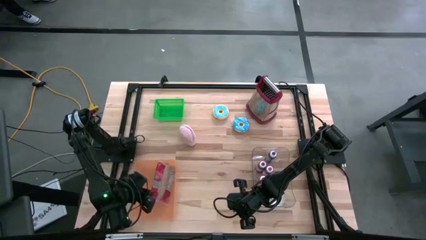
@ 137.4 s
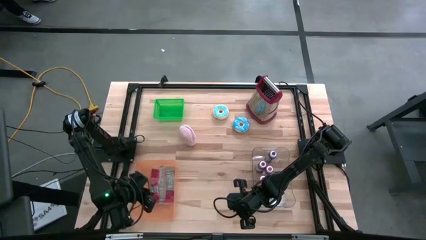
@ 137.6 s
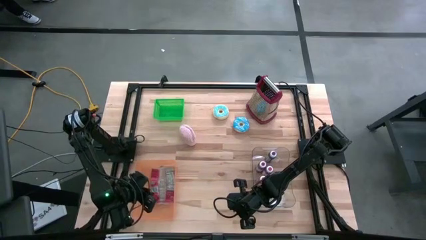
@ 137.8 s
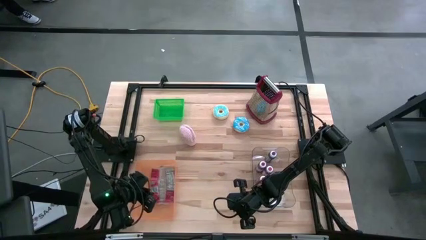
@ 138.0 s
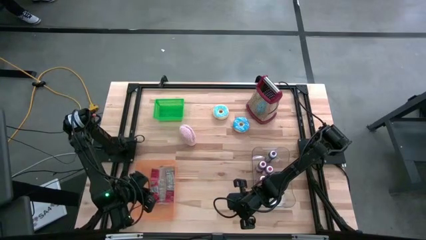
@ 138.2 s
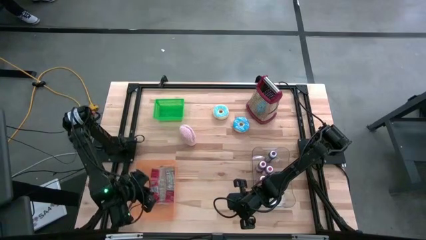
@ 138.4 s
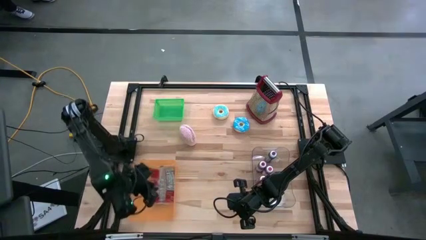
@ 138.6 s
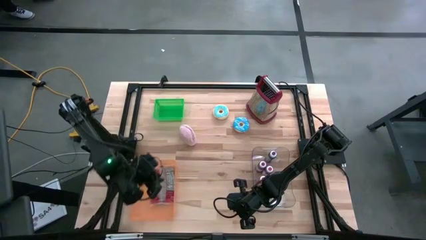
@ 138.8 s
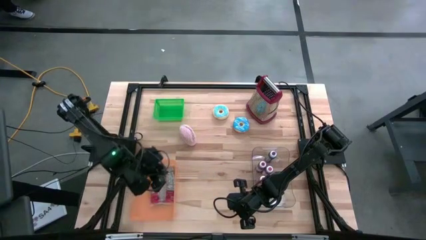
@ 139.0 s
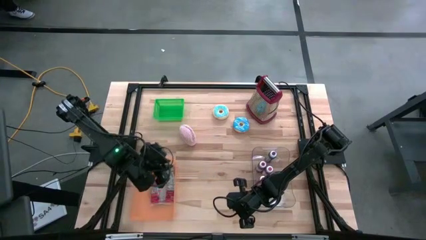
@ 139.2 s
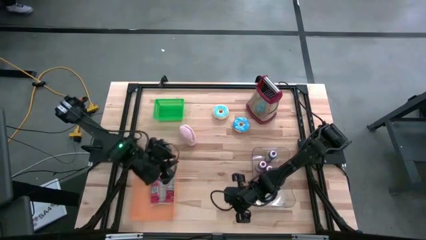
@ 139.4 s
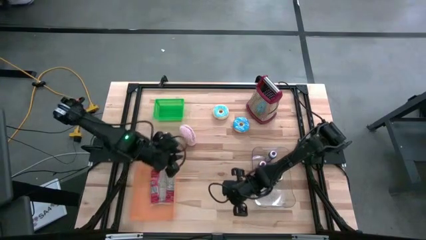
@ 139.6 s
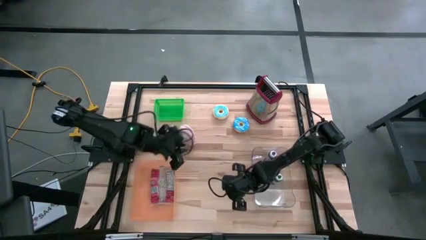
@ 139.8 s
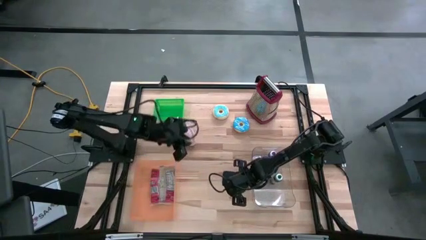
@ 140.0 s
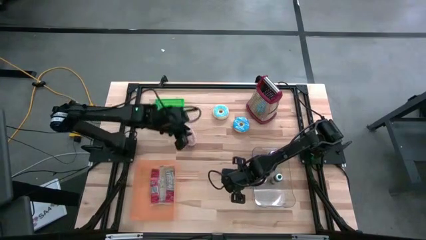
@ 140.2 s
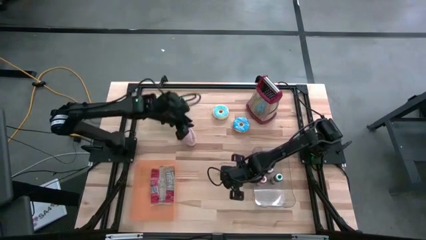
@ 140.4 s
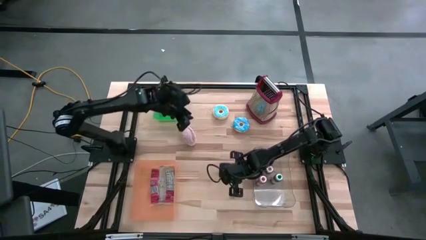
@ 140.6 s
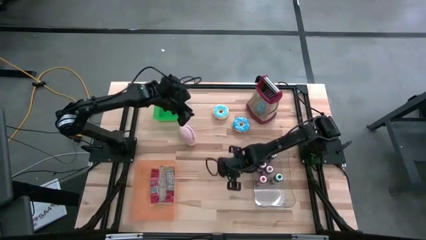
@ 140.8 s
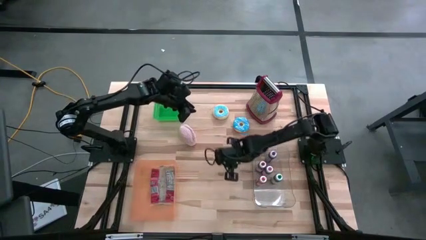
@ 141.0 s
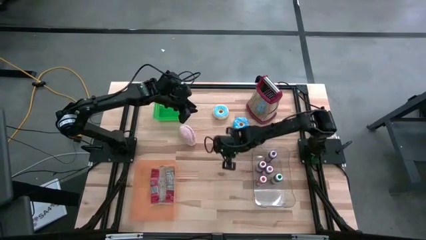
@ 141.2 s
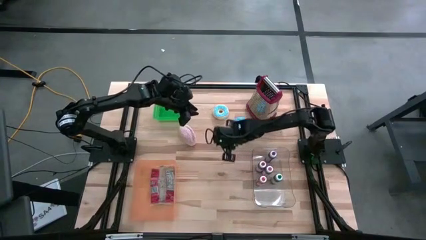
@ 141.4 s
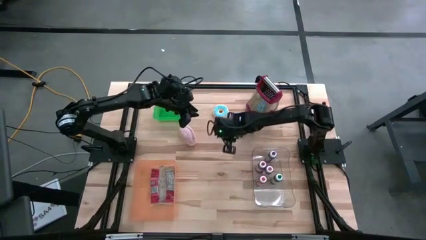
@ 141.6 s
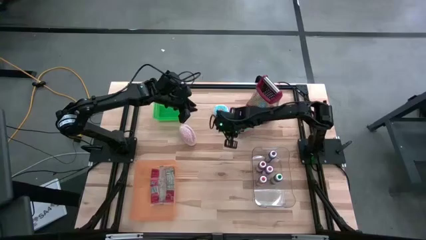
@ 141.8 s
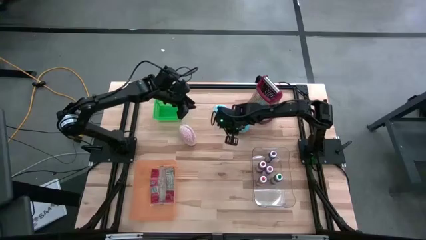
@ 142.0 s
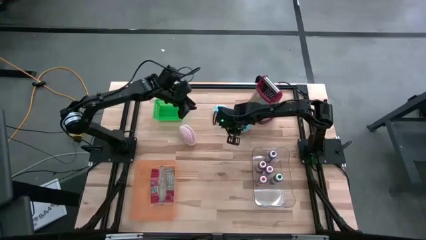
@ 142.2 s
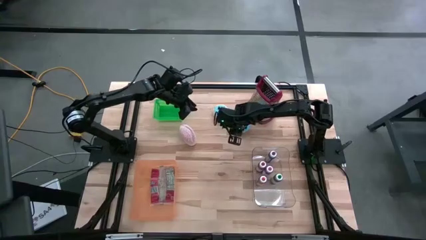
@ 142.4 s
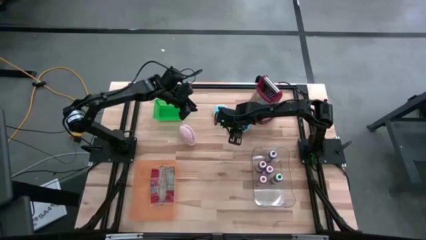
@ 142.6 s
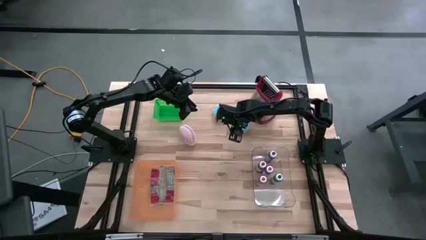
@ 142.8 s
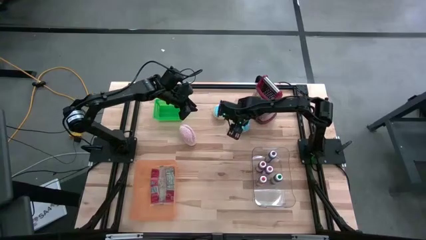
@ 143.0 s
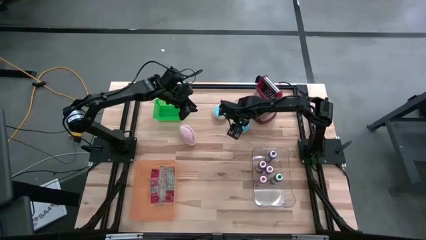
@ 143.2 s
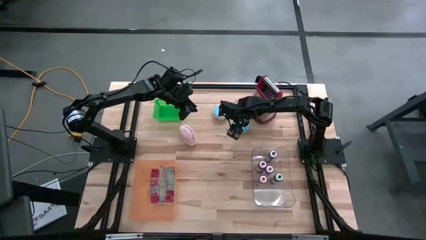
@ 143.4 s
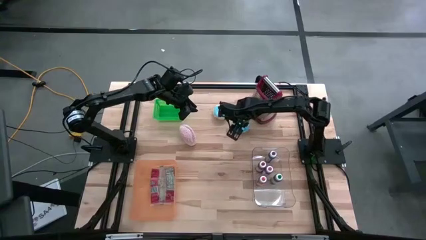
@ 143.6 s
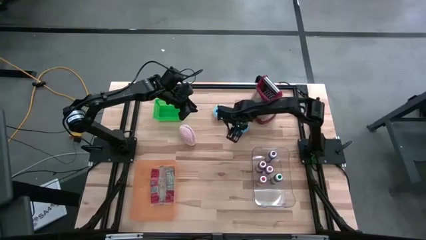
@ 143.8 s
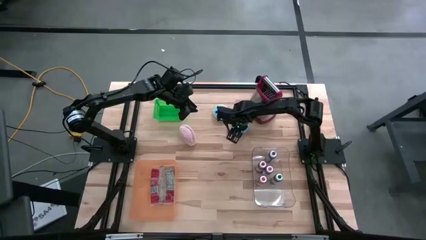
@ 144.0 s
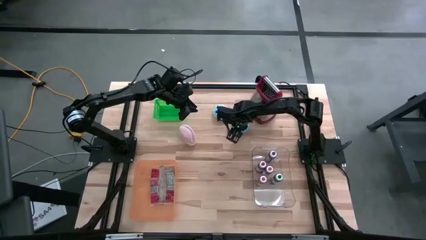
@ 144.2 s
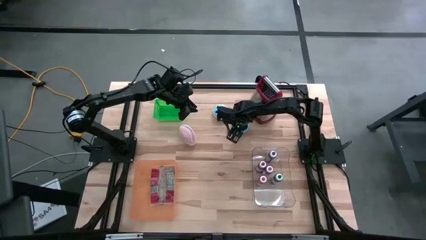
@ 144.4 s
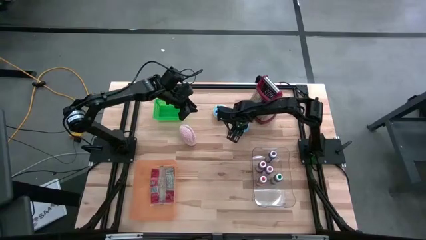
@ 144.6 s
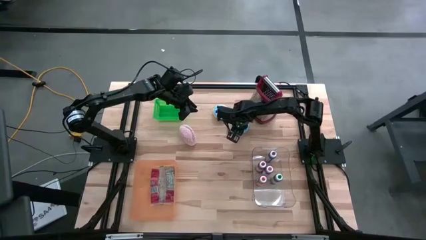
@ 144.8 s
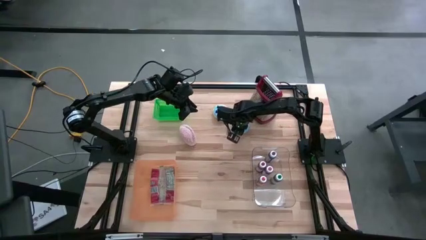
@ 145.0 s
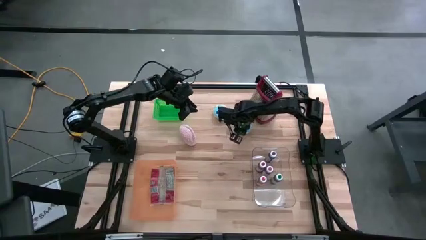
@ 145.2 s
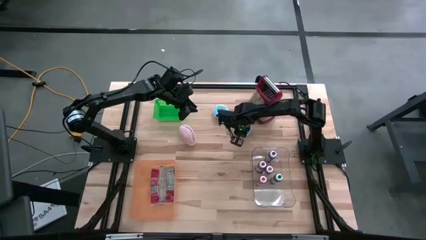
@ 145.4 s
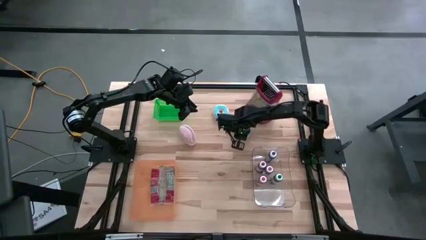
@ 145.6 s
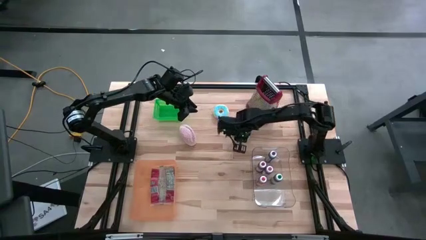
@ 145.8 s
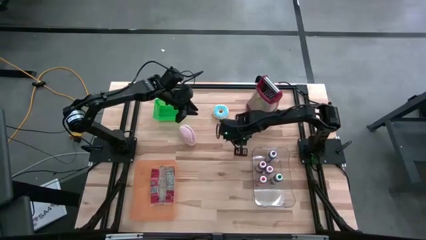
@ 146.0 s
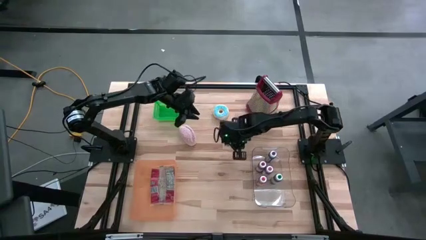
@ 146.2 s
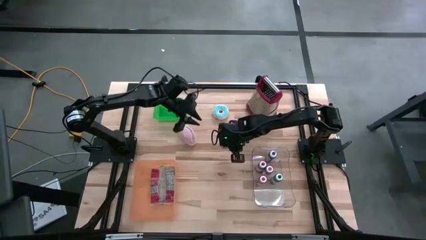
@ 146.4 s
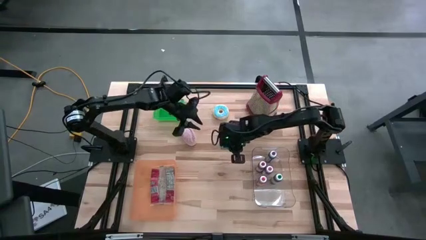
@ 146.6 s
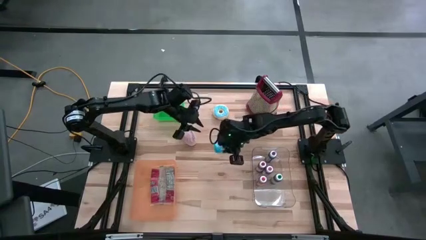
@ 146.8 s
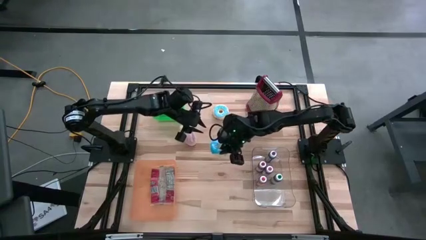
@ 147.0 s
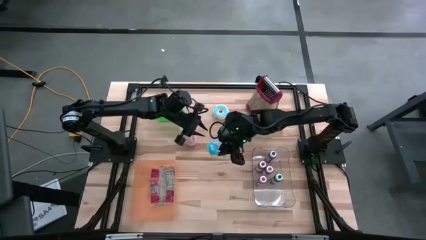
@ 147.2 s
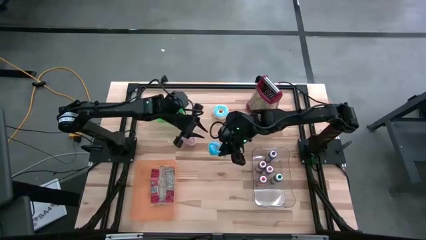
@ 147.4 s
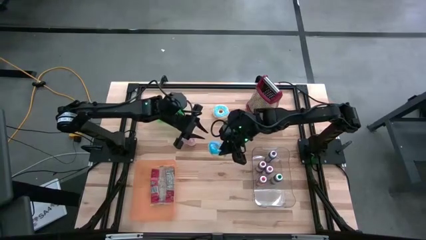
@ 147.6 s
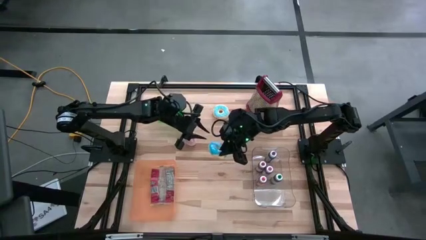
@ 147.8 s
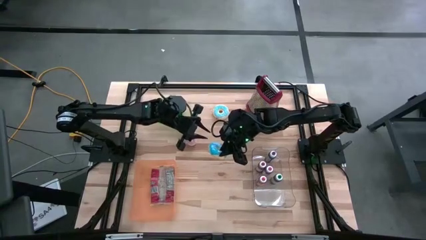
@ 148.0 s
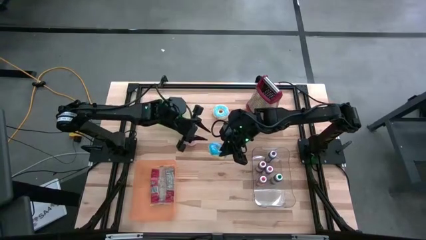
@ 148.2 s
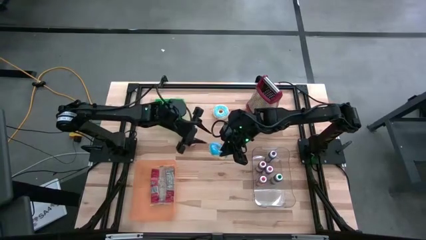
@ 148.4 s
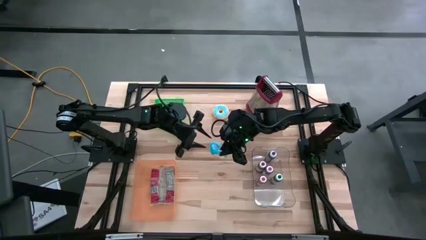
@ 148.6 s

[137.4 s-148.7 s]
Put the blue donut into the green basket

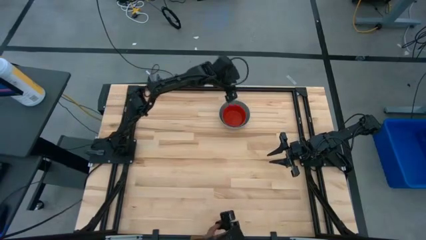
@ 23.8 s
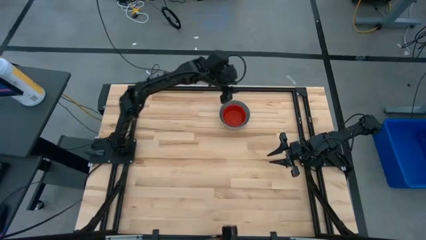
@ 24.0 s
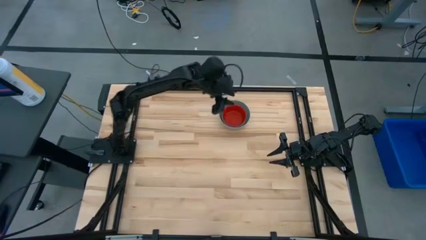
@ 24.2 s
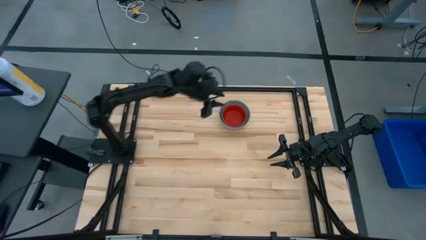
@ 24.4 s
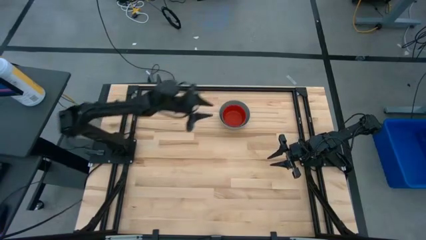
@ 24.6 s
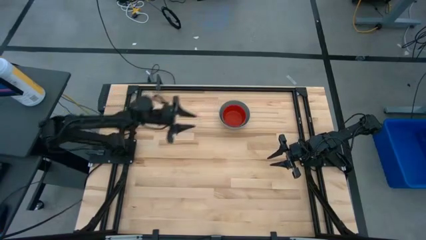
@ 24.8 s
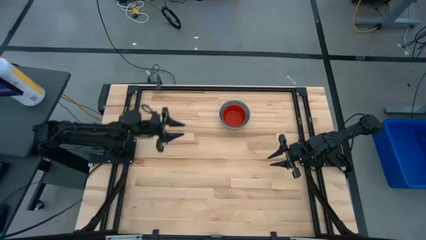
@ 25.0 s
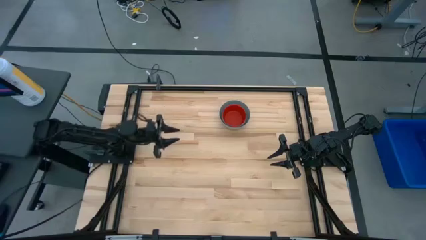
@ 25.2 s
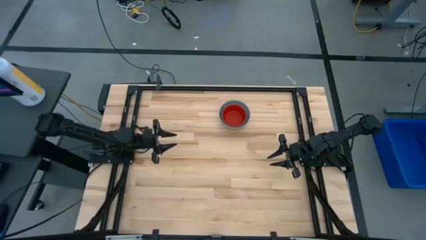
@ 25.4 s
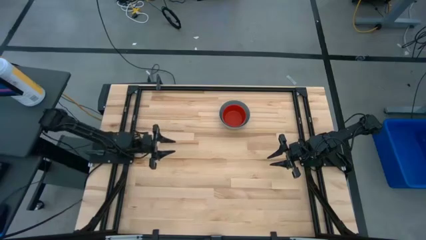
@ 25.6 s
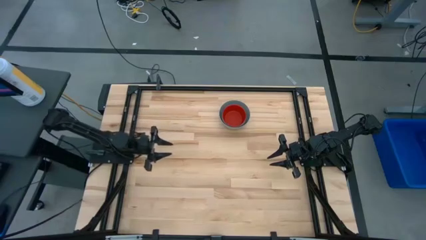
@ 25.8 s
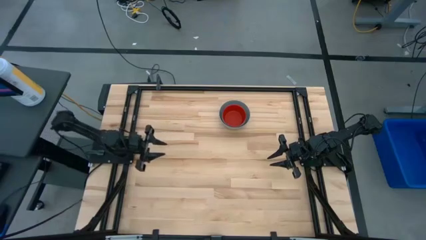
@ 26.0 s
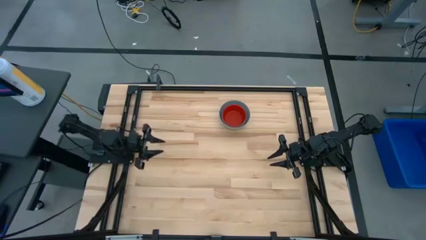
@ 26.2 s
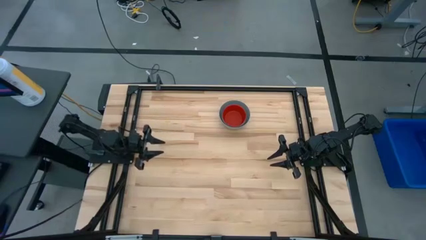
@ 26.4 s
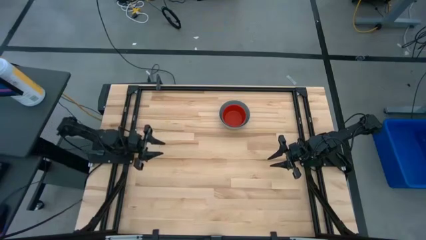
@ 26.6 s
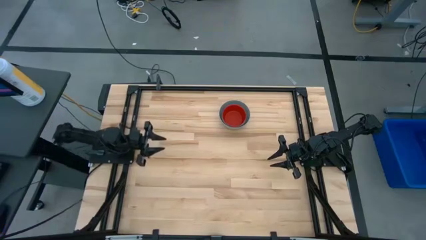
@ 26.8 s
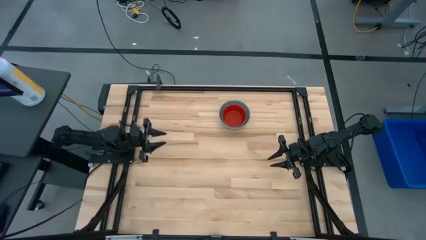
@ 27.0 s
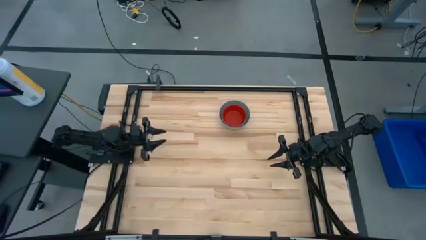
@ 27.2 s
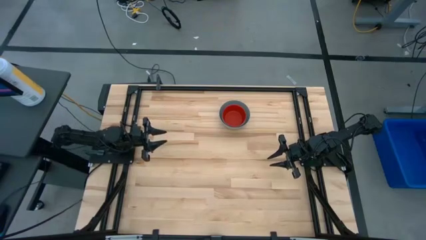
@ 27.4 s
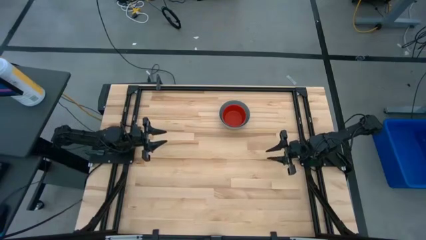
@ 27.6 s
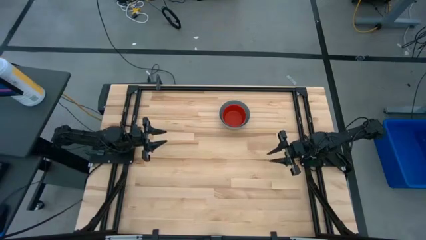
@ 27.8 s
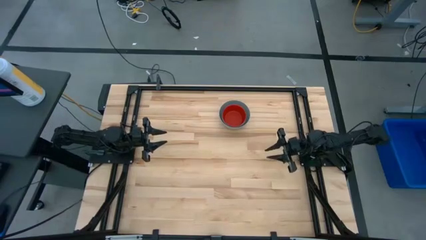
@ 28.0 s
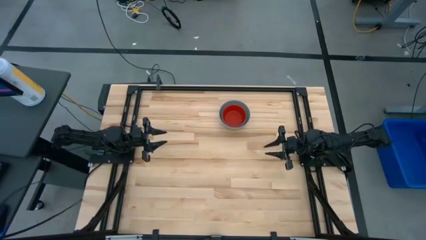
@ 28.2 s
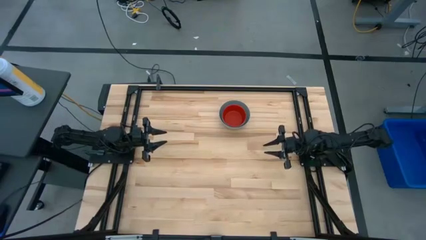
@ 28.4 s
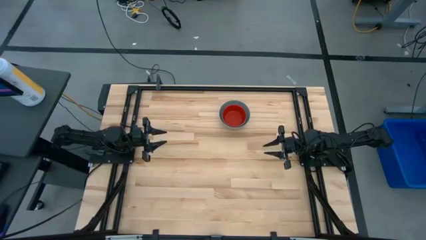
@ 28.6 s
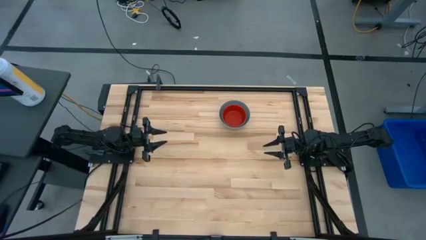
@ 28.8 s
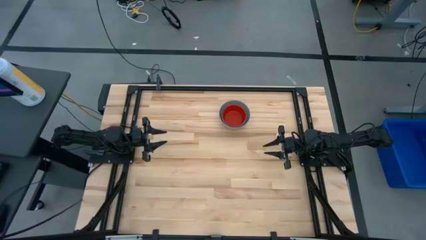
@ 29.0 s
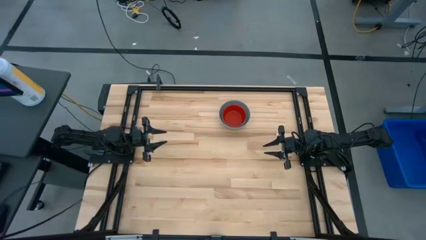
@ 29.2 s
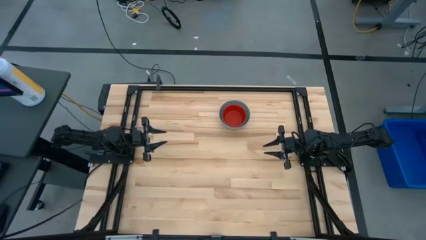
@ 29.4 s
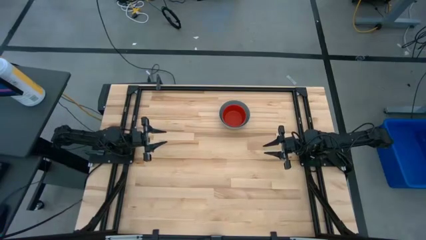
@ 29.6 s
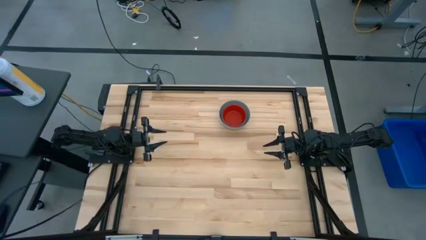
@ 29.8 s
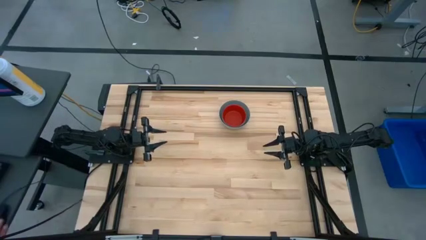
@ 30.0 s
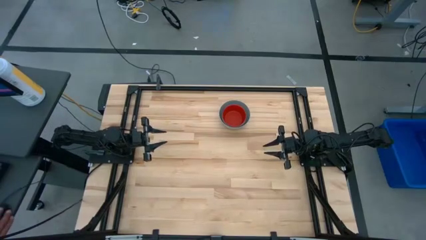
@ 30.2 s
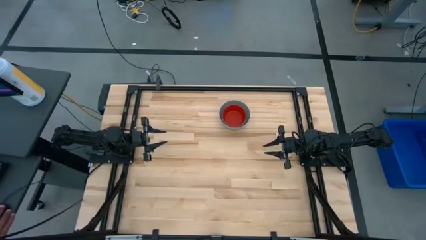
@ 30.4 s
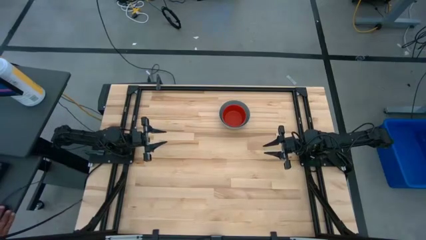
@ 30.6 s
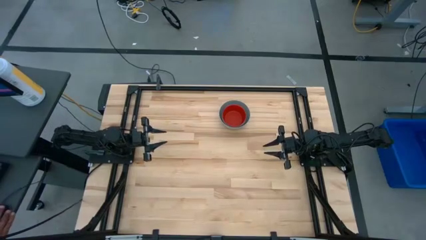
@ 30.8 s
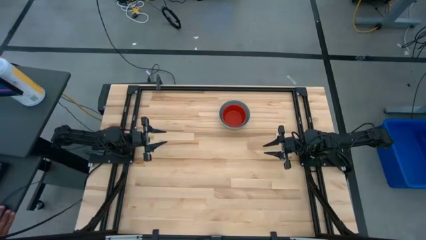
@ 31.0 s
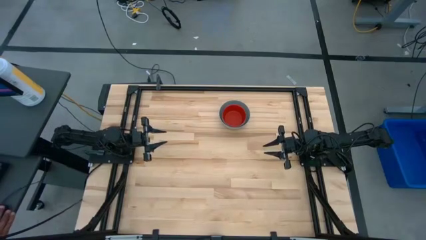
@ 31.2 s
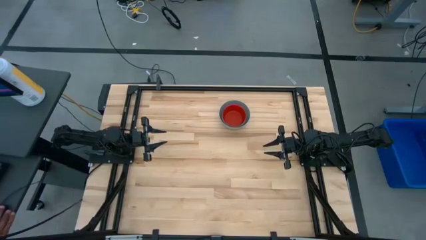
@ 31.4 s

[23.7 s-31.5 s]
Return to Home Position
